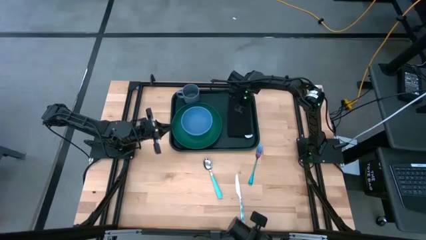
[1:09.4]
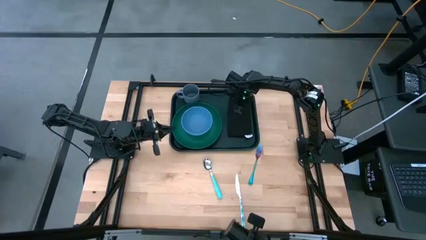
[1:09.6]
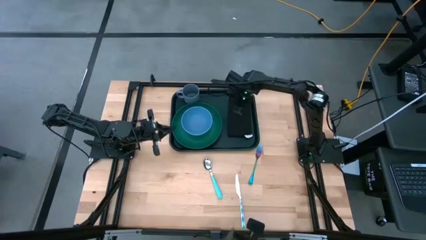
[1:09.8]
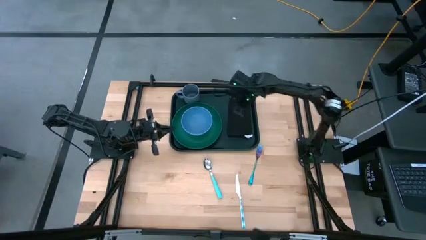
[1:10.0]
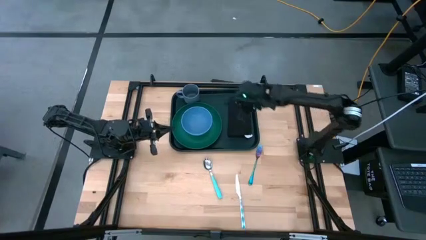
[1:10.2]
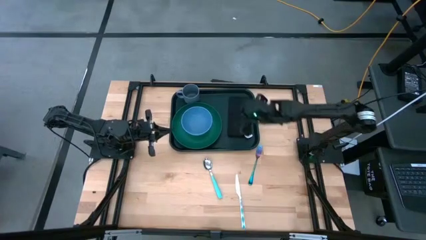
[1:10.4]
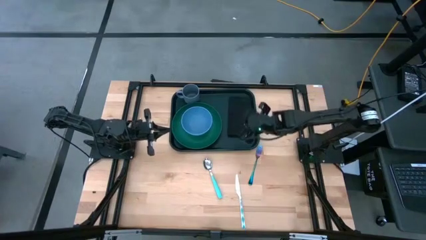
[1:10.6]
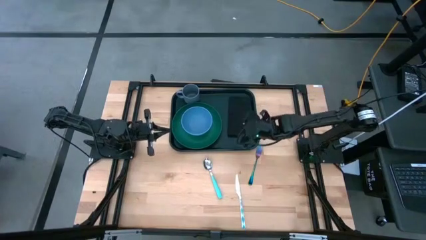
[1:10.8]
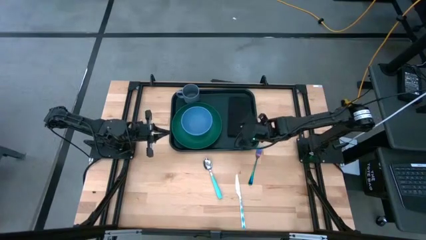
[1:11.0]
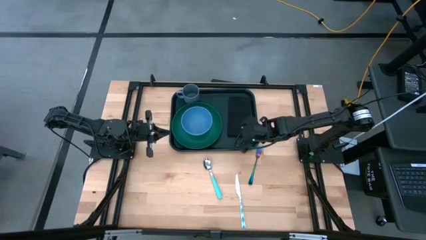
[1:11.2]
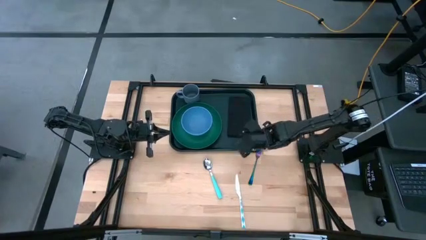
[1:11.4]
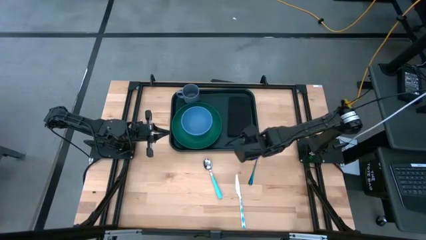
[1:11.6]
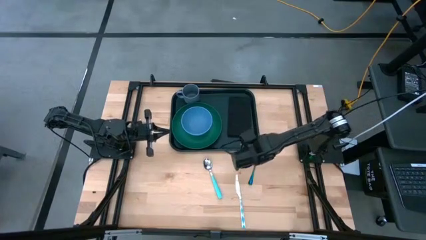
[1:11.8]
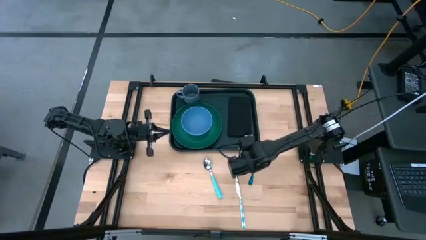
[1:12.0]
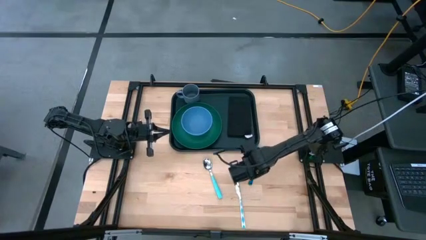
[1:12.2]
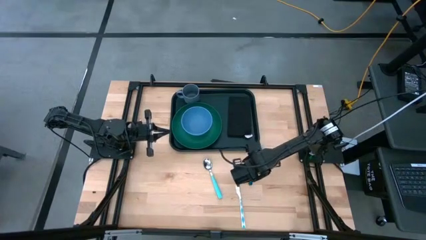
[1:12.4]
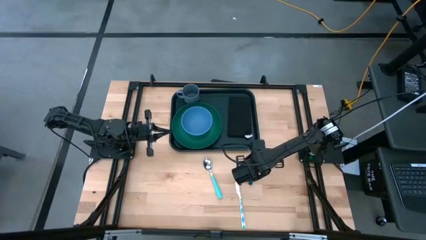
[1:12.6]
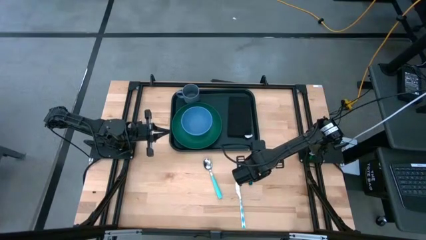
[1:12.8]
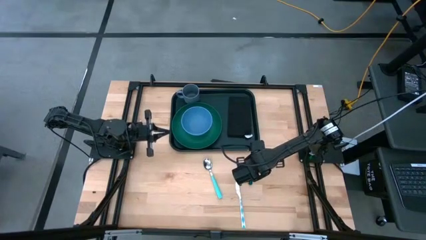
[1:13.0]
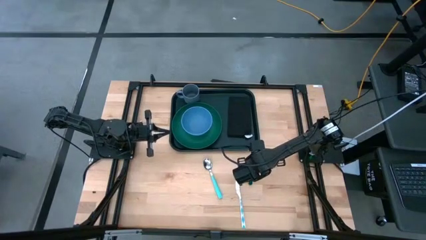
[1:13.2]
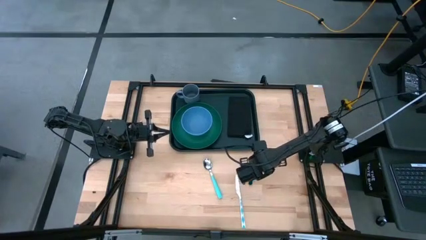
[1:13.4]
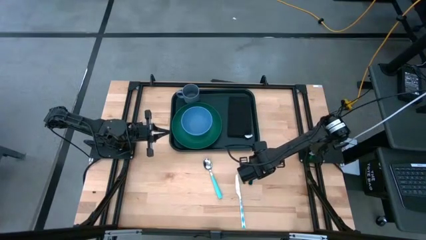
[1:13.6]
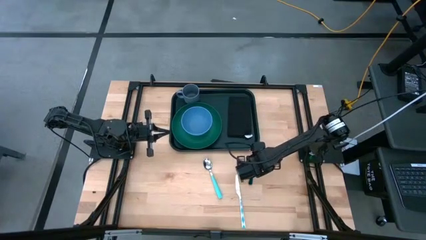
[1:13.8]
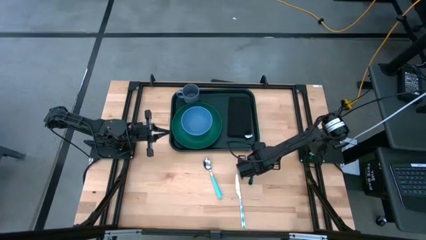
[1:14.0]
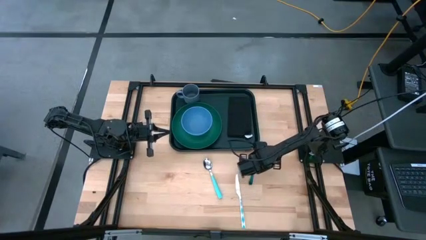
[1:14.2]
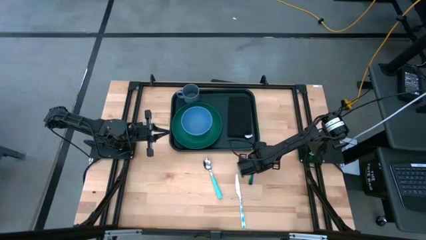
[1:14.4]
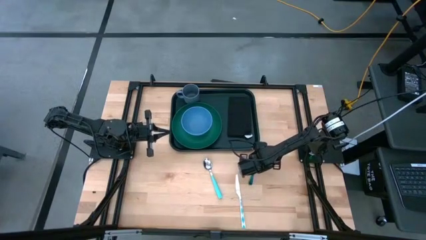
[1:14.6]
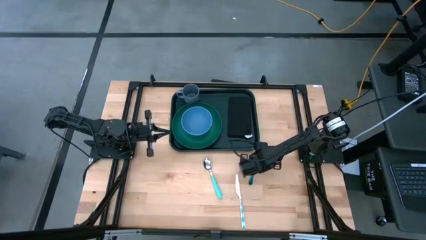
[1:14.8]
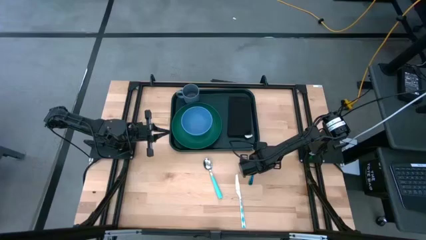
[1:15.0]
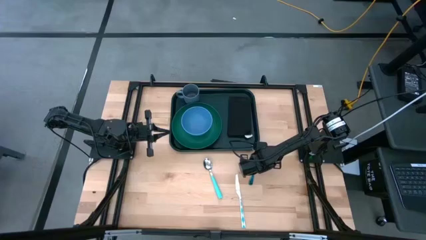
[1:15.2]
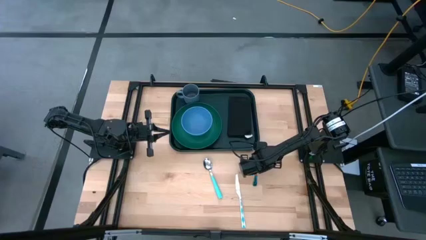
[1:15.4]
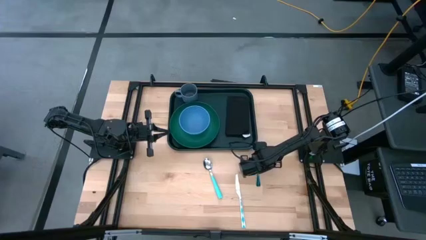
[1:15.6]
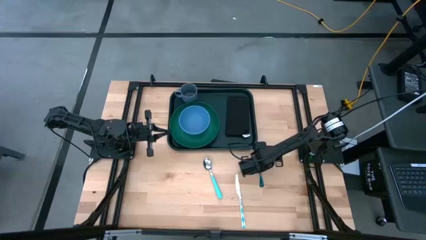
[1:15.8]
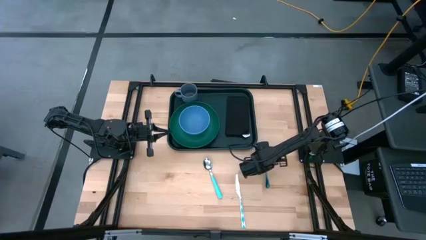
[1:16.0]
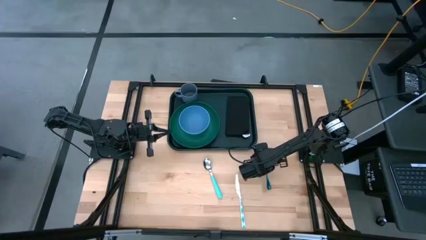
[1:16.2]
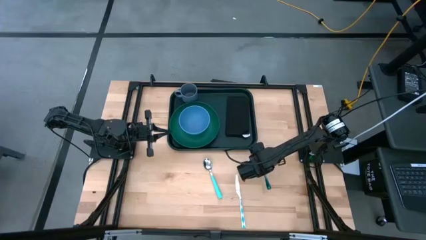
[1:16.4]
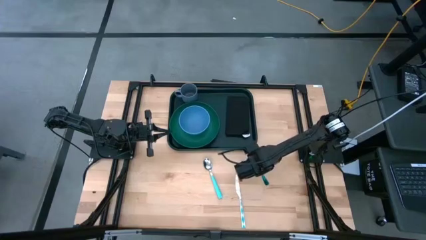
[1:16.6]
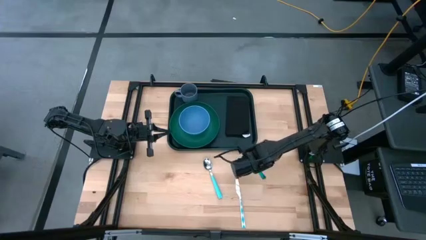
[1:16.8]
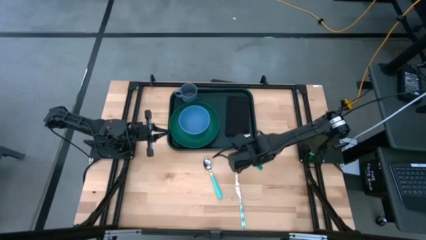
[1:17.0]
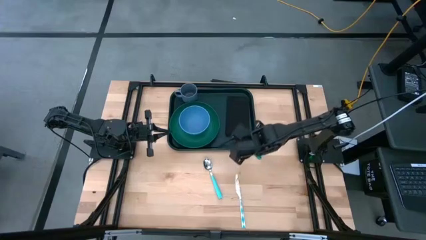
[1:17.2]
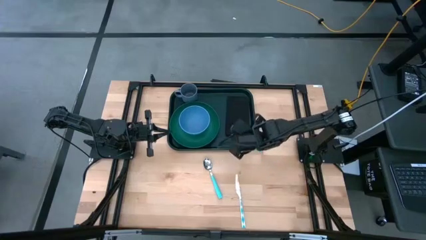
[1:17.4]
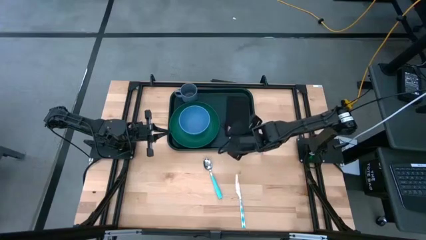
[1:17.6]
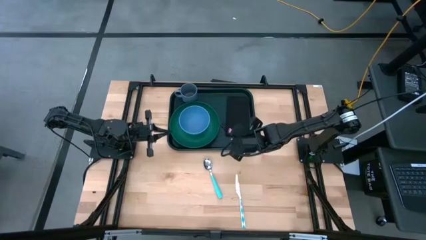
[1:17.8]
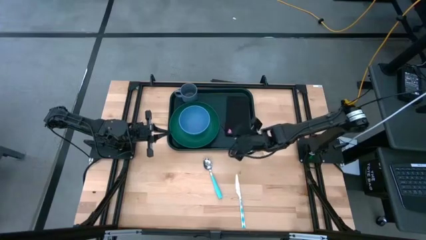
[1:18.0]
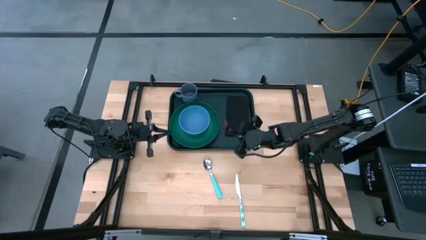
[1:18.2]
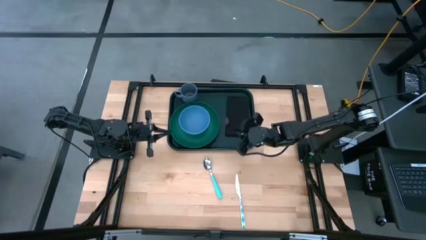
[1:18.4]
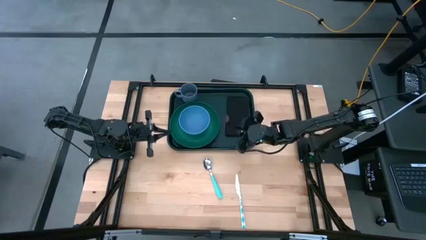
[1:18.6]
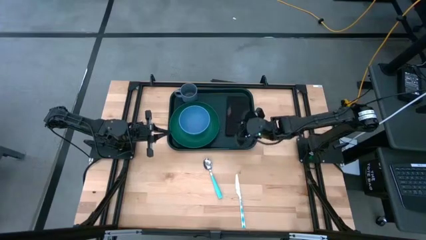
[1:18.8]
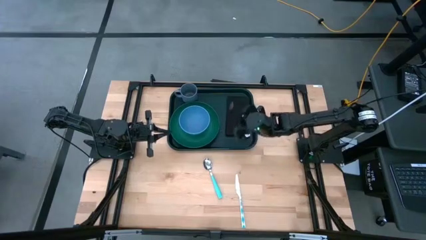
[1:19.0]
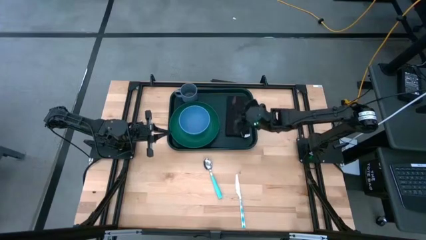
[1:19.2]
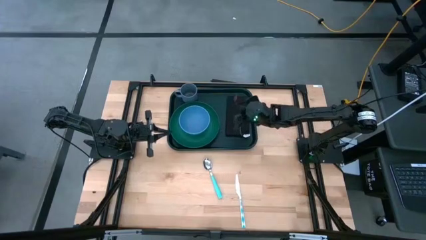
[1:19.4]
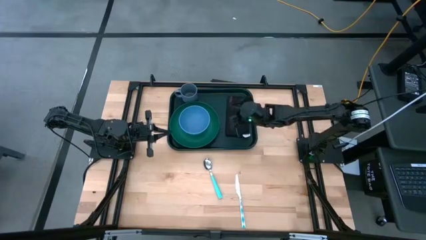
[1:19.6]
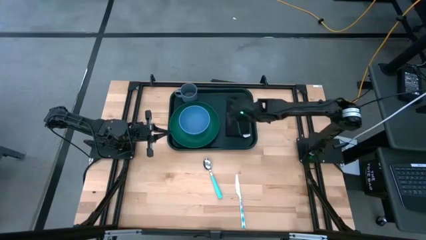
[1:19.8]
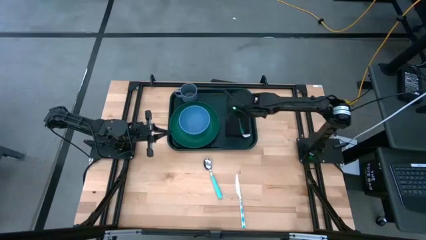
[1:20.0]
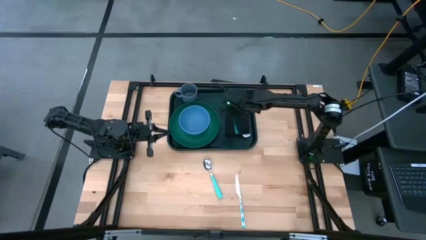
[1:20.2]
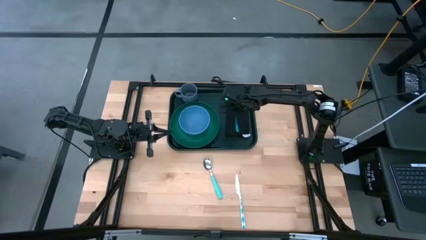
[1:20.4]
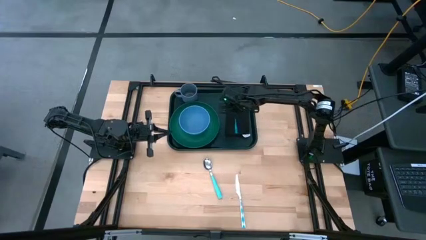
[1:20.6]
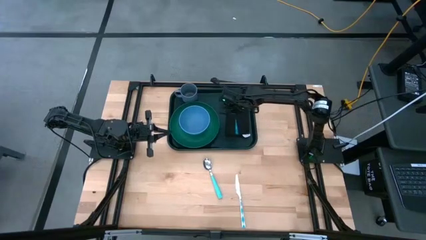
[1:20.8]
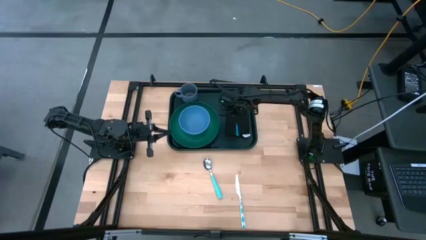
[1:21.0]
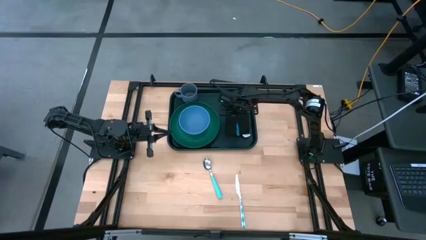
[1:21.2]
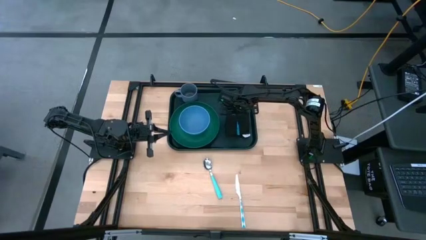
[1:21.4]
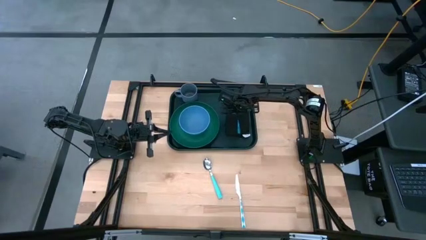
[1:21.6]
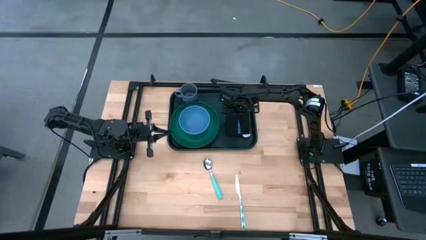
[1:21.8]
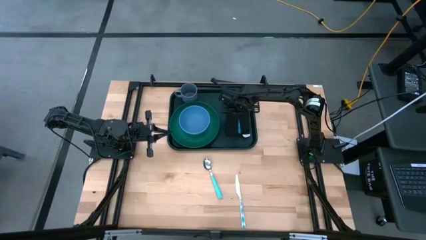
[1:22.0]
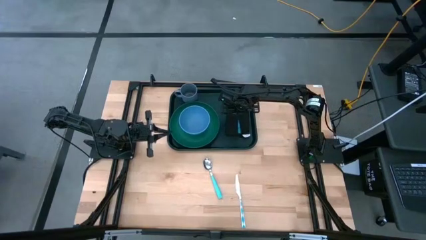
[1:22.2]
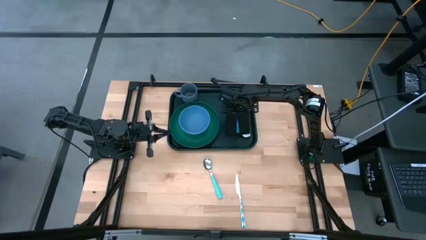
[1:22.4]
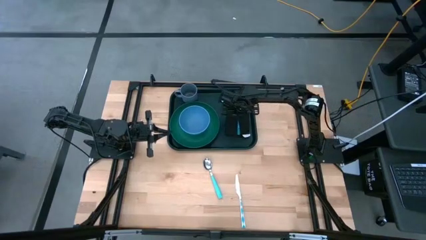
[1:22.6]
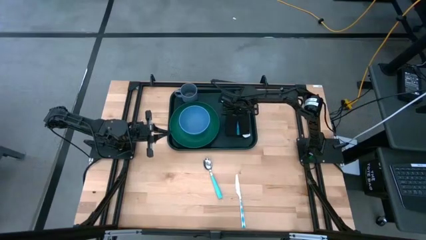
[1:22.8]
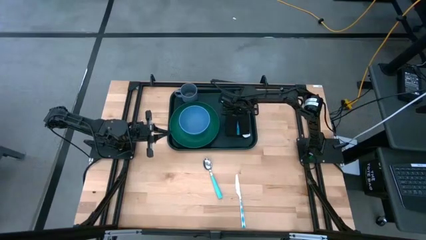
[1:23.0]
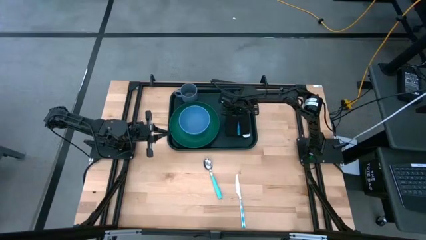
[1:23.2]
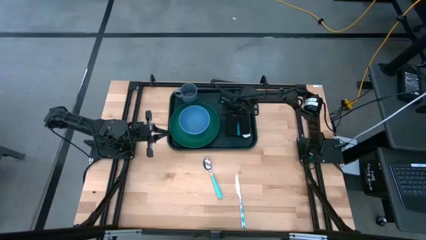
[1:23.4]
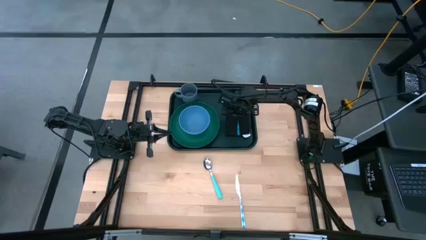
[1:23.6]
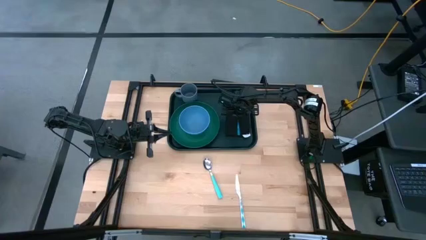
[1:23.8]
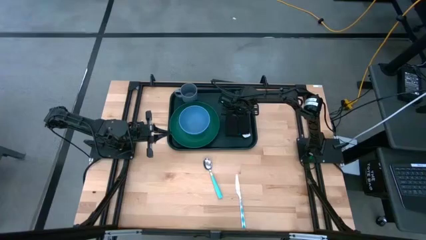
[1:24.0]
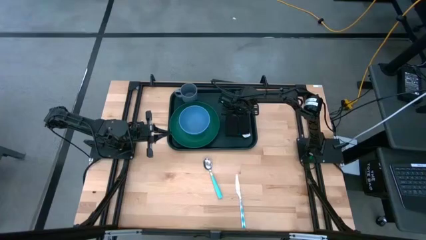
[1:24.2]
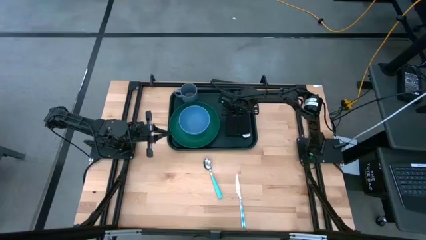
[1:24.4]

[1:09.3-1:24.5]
Task: Set up tray
Put the blue fork in the center of the black napkin

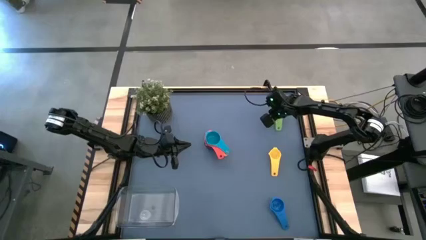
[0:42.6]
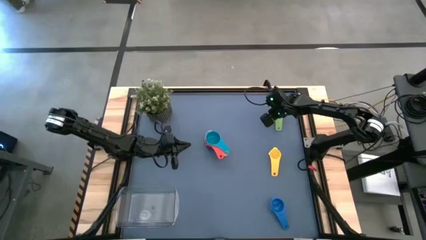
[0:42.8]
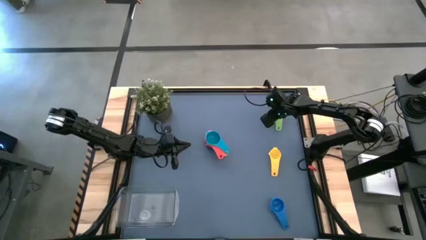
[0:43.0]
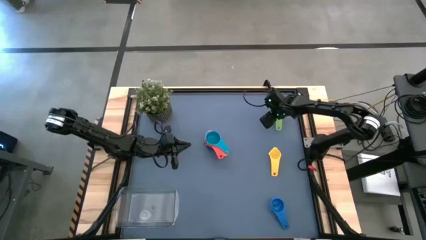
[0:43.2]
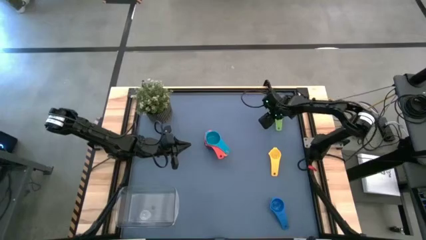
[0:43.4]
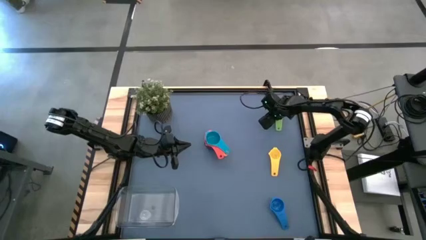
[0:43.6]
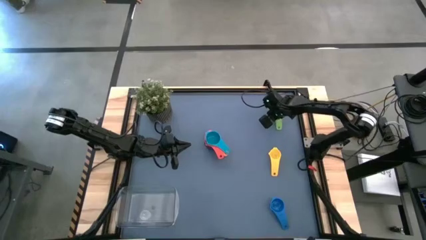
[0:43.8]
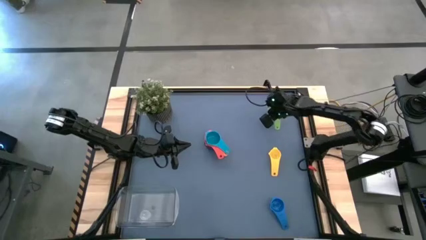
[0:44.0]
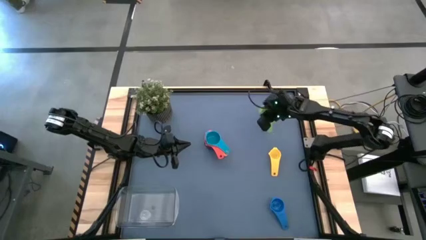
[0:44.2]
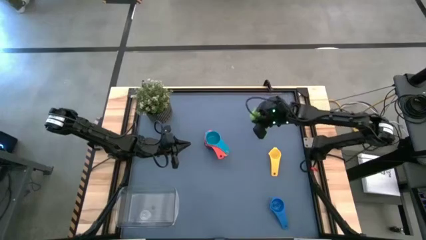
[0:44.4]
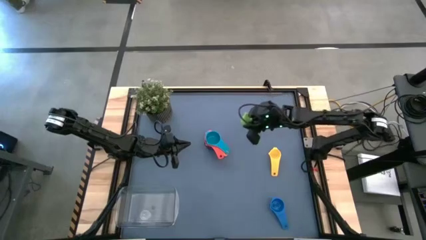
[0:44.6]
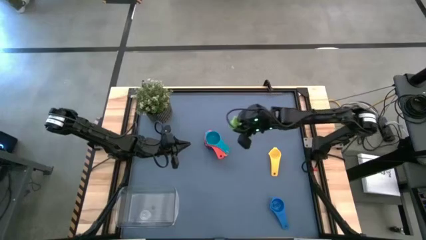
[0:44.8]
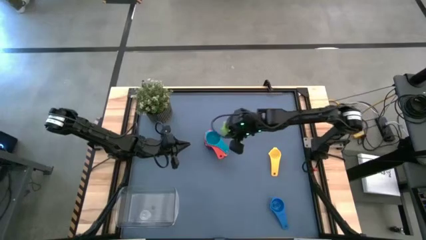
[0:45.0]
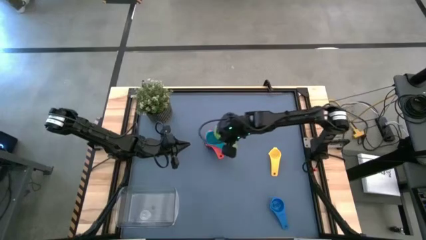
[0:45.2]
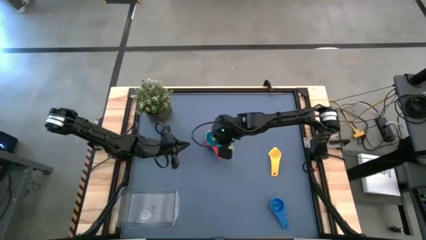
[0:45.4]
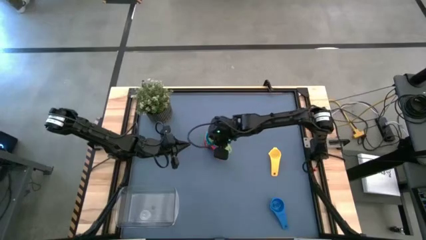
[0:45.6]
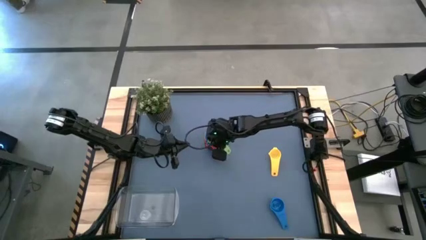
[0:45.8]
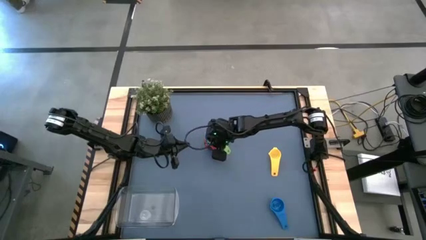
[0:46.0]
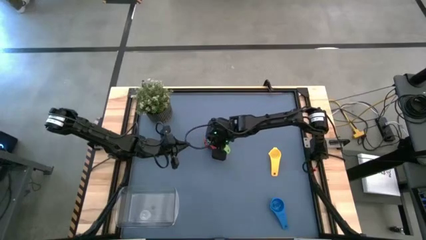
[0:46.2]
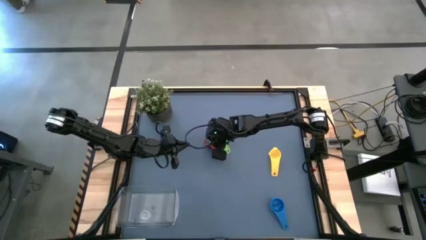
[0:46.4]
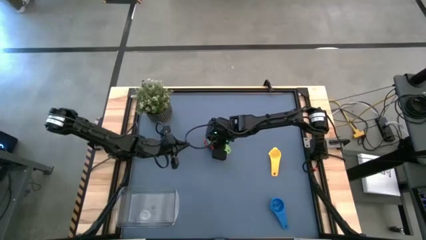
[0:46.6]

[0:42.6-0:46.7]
Task: Nest measuring cups in basket
Stack the green measuring cup on top of the light blue measuring cup
